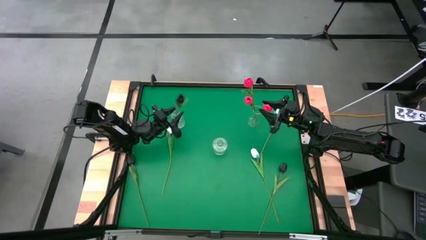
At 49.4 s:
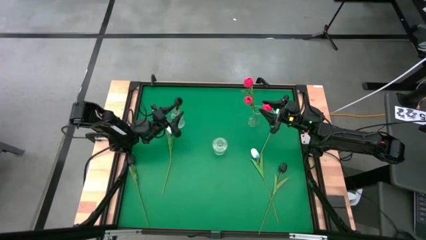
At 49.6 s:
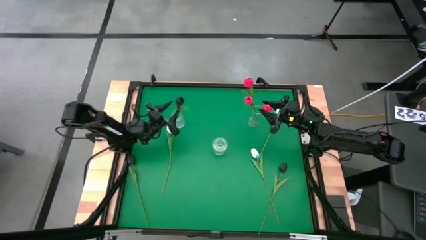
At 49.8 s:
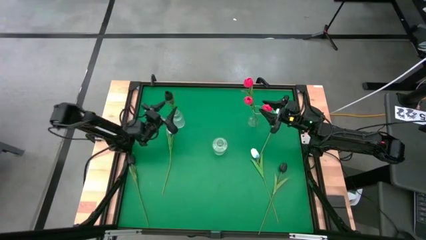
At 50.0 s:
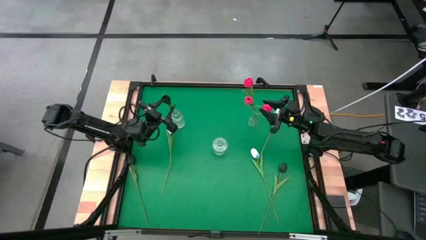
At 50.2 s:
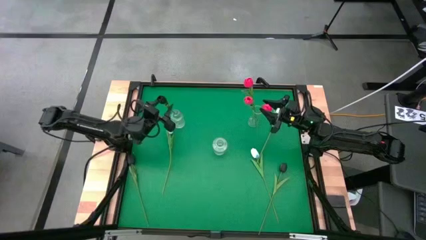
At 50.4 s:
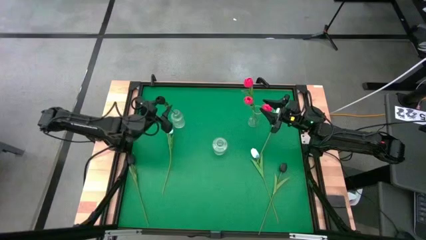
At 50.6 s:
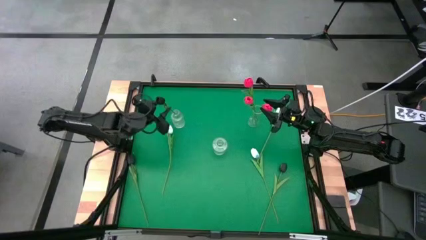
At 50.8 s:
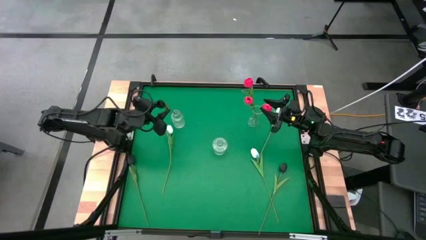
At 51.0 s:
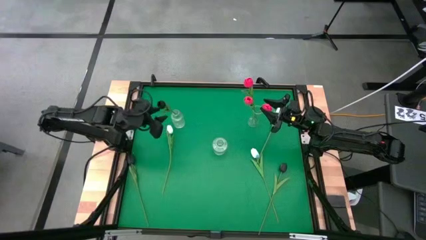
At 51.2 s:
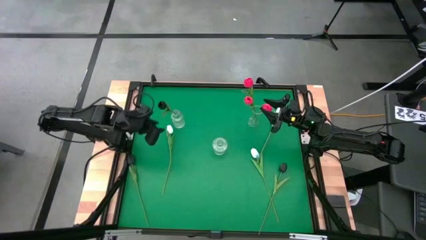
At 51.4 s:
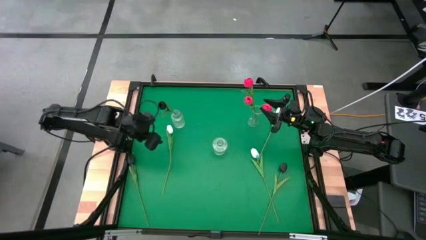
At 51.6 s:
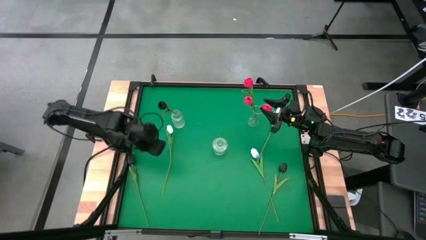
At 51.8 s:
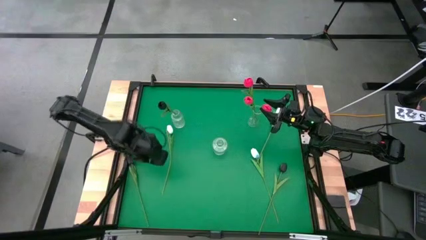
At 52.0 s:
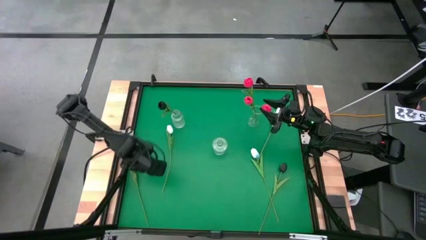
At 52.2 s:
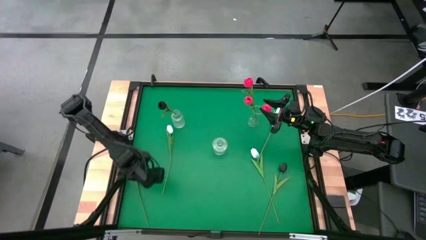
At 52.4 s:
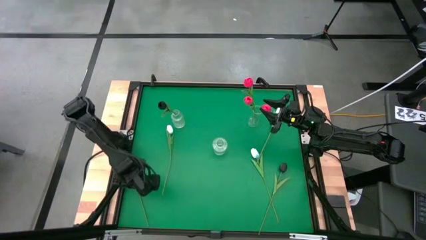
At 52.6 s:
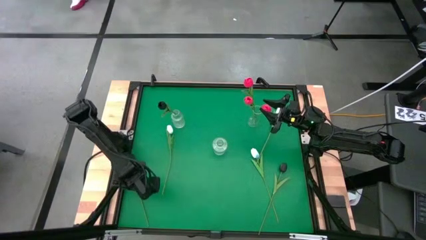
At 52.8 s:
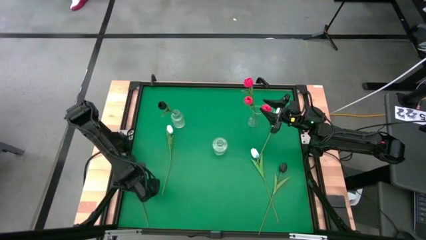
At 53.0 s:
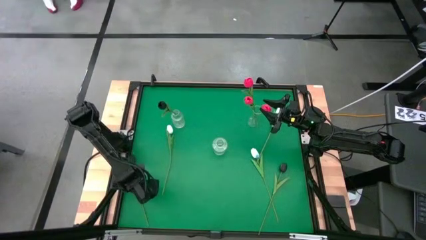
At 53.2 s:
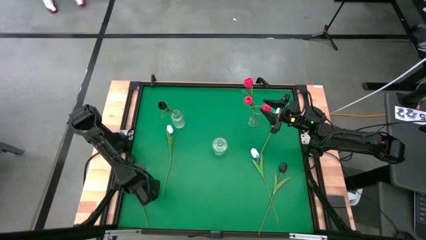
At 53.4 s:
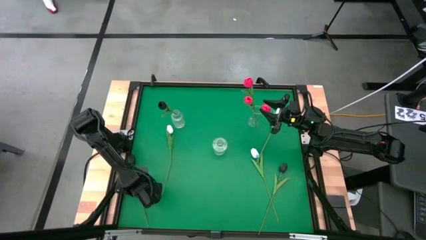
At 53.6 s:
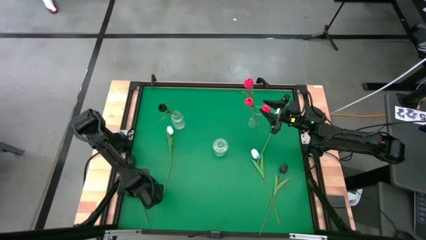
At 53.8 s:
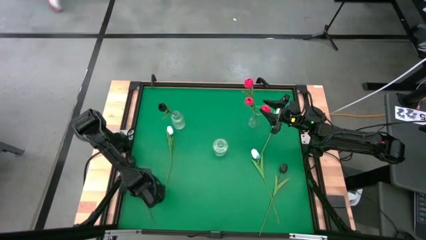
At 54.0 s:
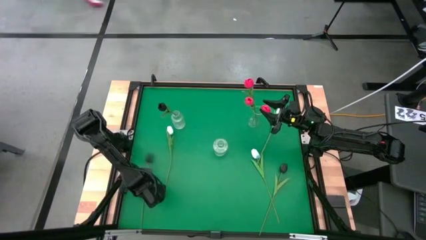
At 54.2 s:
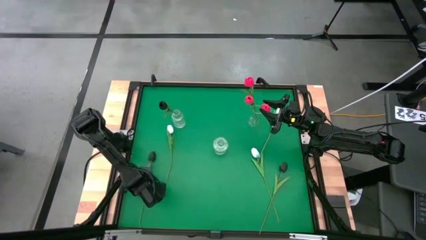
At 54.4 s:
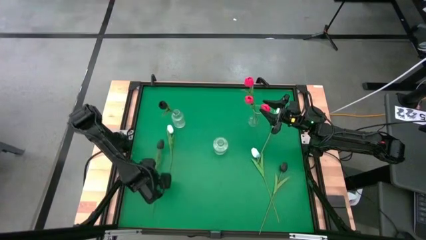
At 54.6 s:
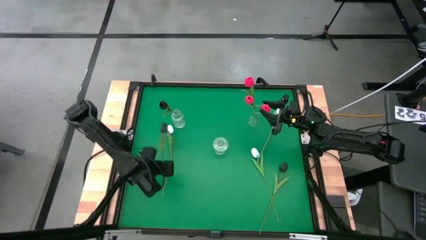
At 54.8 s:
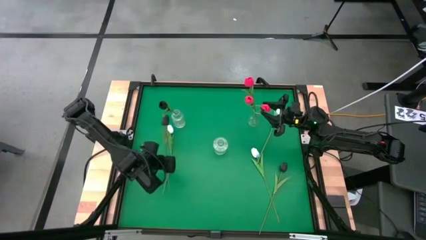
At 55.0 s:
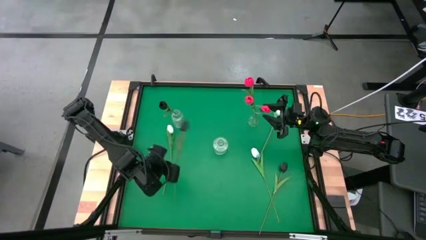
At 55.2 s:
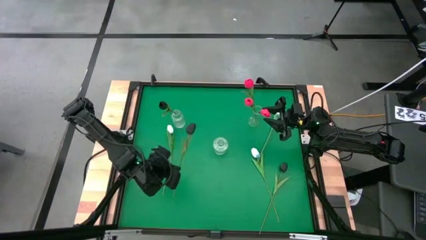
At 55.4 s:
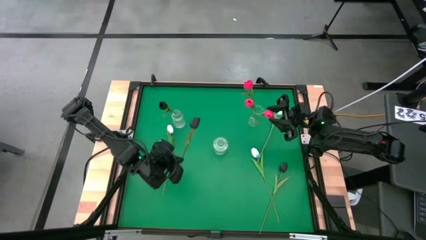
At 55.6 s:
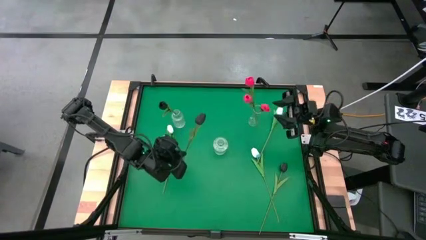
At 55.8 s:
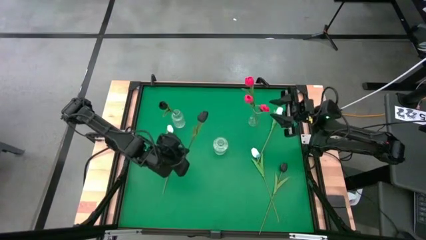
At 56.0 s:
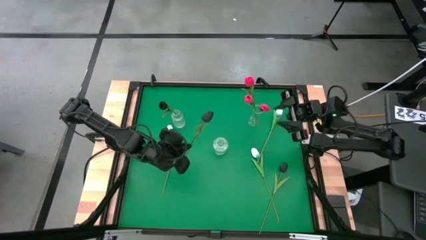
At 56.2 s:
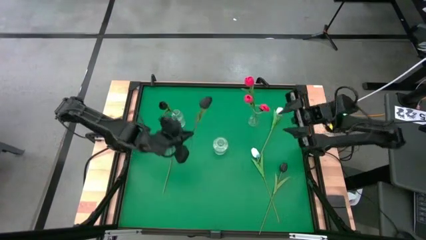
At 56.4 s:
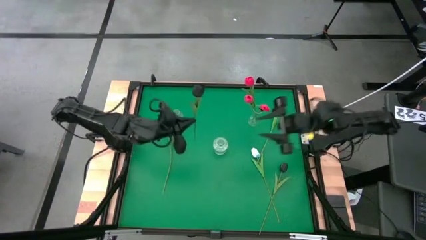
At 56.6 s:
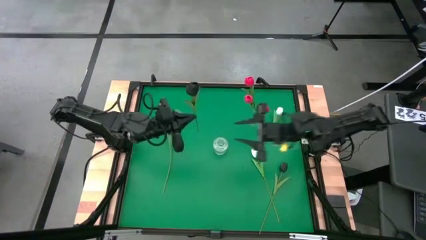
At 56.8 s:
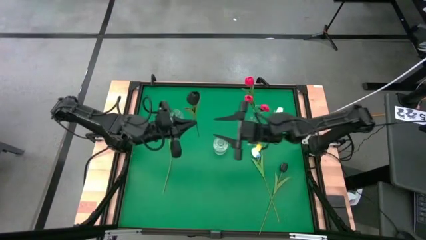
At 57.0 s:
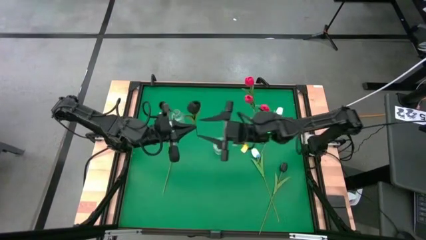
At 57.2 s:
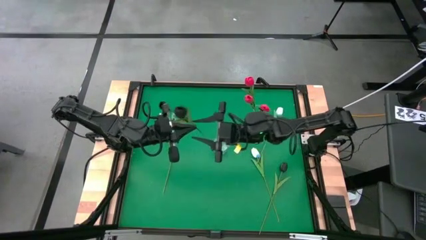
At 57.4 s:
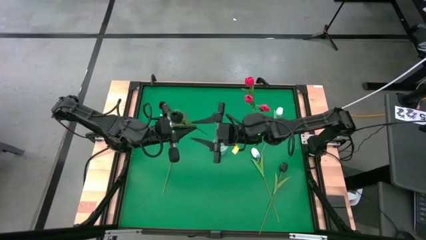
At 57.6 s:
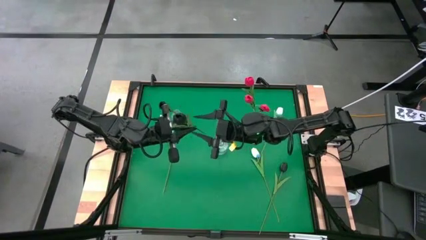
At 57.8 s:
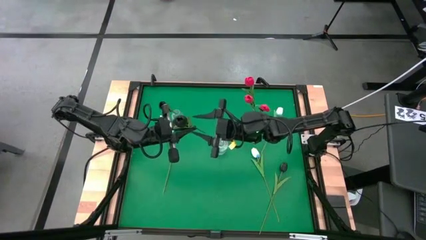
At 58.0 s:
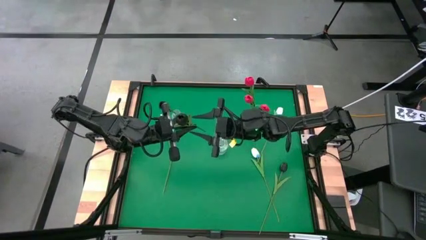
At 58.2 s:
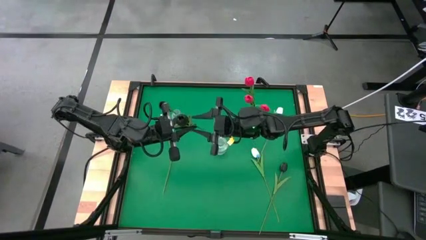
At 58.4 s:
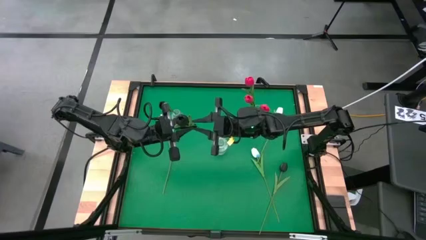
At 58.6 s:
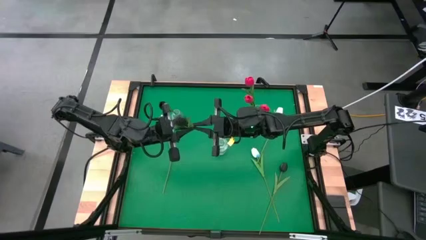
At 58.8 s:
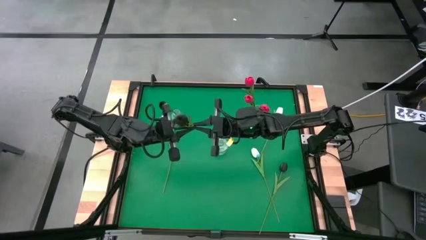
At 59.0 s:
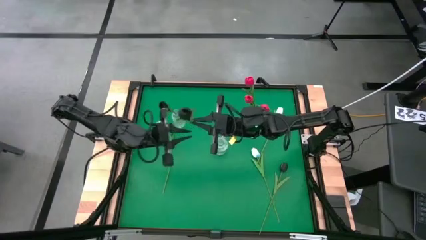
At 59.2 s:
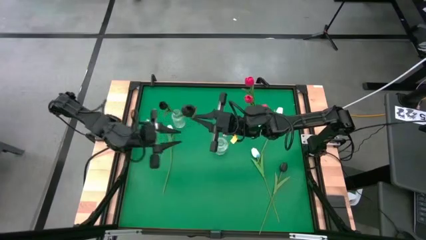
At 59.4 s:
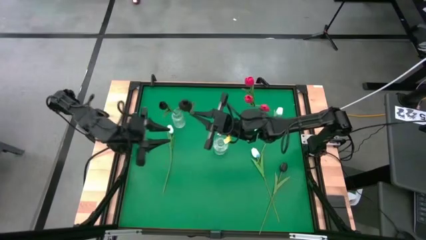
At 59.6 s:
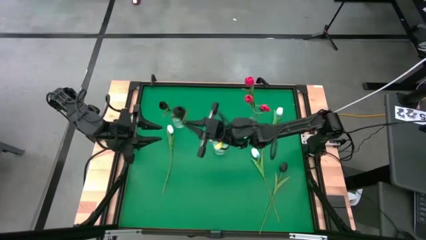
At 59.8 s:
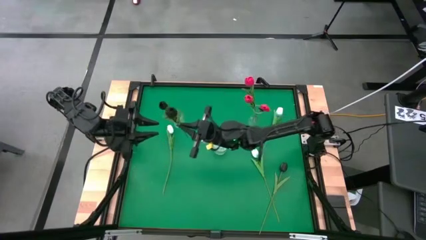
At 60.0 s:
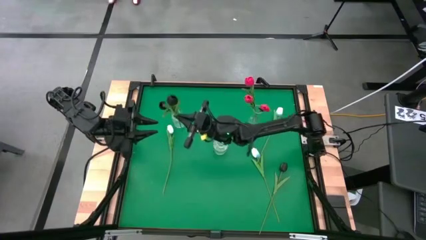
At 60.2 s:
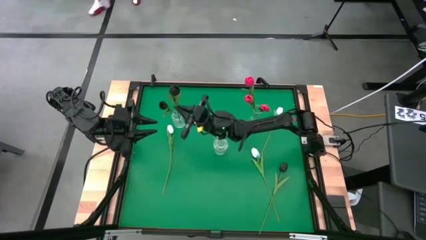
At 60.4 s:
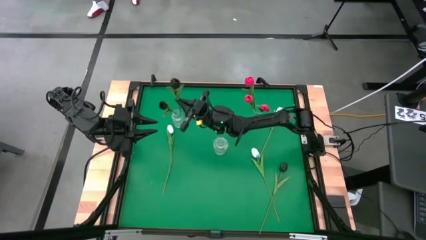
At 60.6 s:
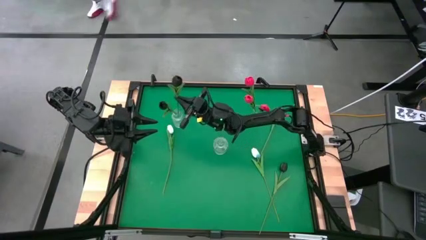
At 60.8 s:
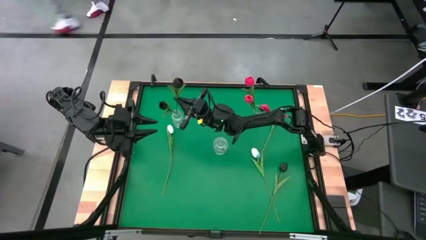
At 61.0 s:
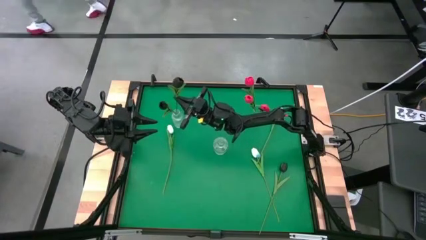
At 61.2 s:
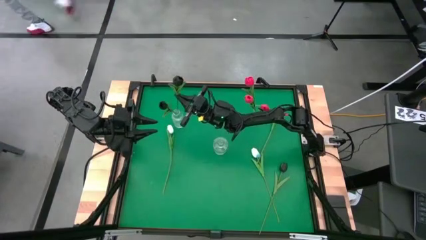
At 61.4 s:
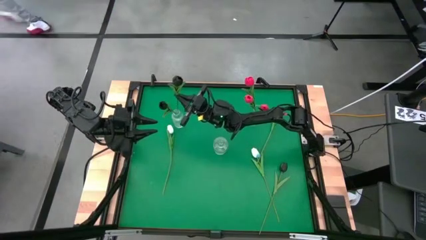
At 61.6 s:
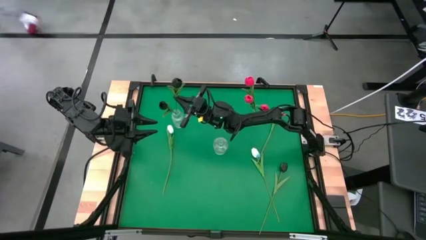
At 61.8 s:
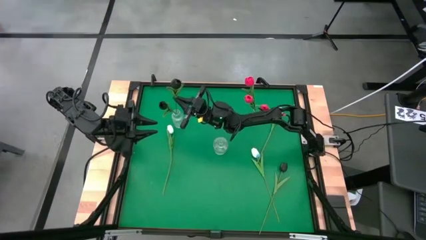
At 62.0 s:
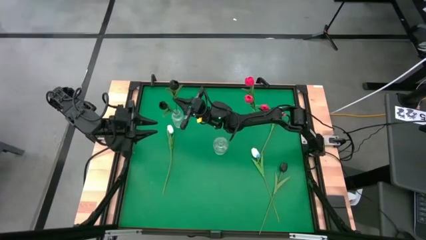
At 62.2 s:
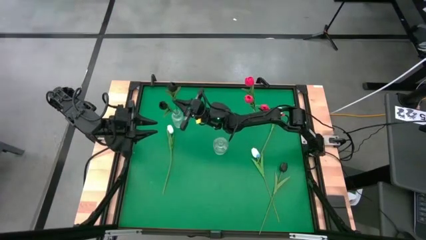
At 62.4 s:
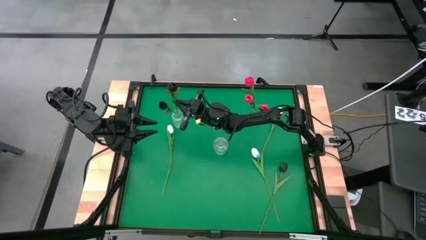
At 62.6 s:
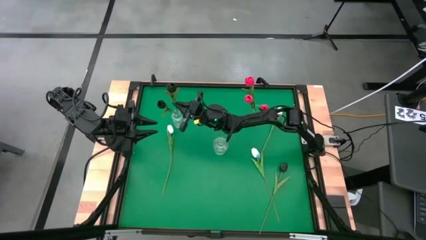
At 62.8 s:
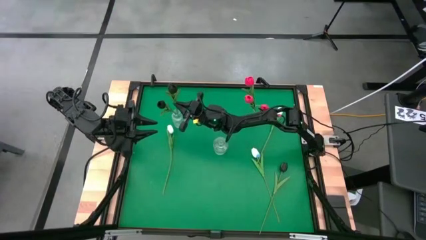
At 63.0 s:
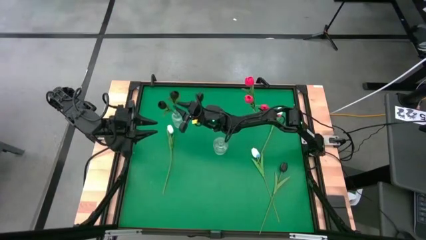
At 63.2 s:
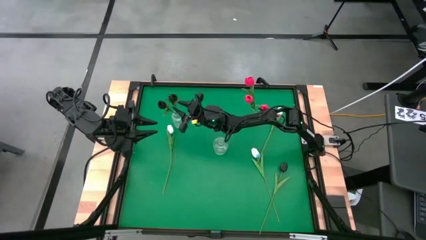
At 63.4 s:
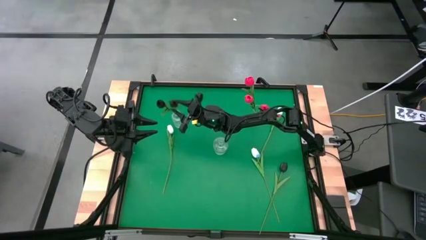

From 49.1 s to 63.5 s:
Task: Sort flowers into vase by color
Put the left black tulip into the left transparent vase
